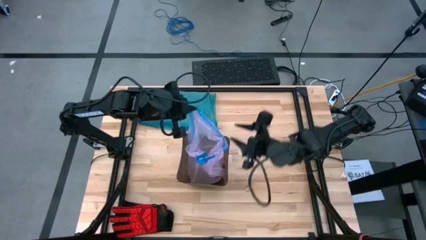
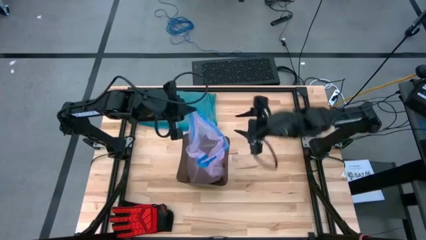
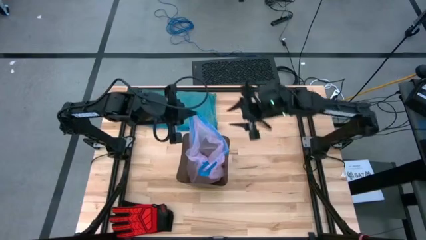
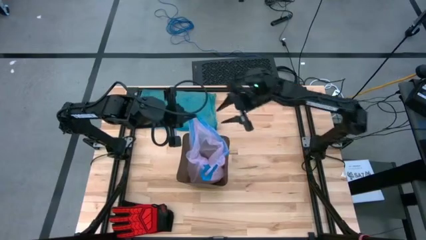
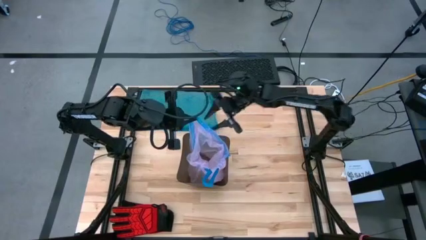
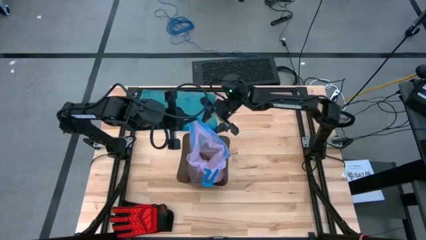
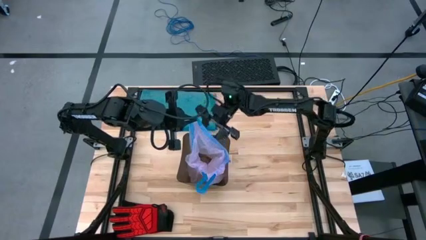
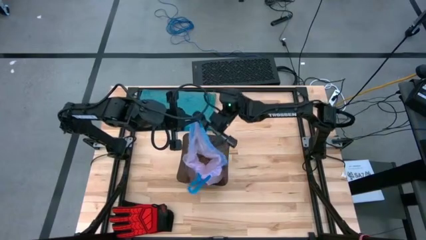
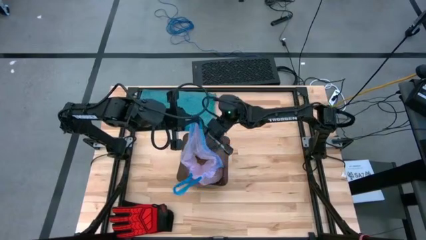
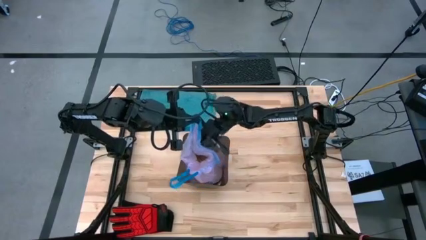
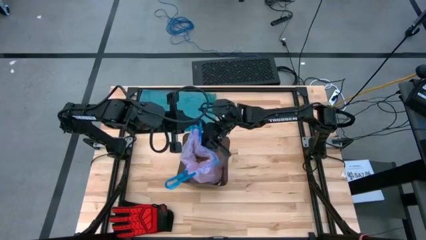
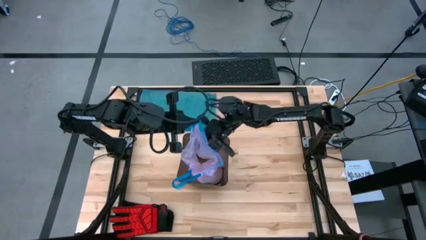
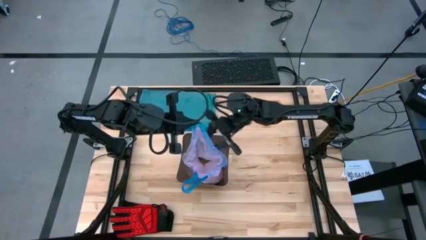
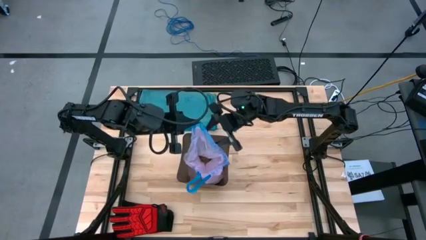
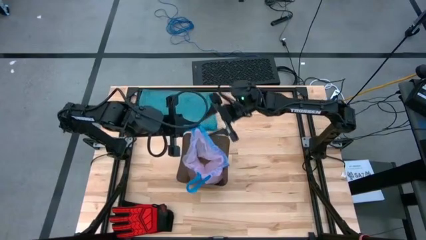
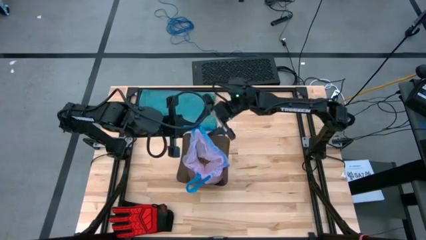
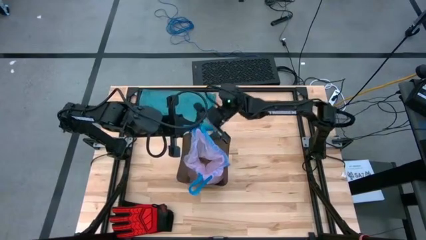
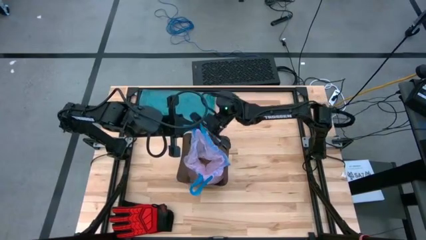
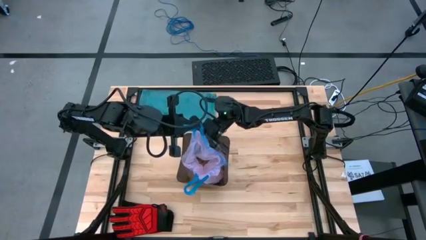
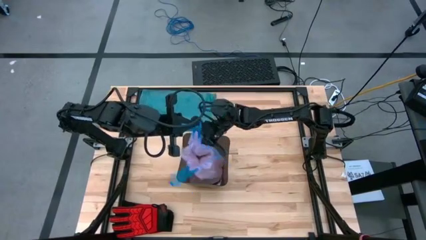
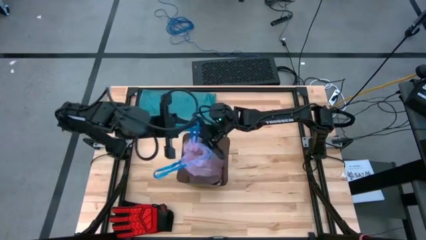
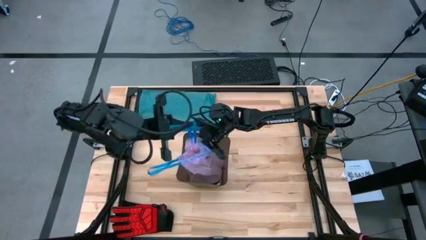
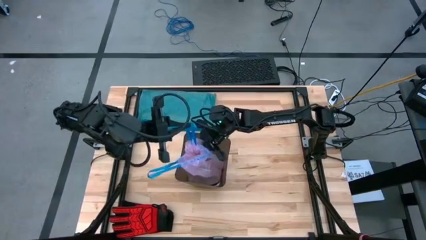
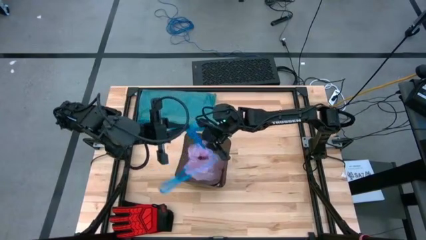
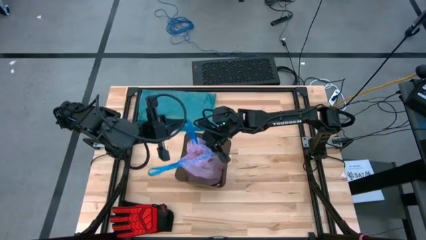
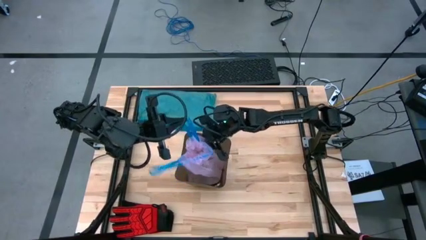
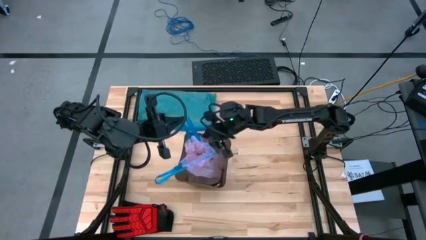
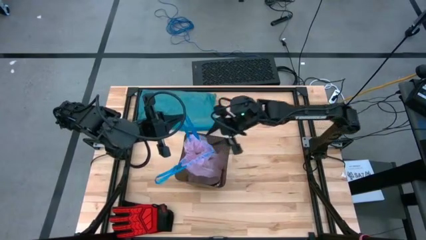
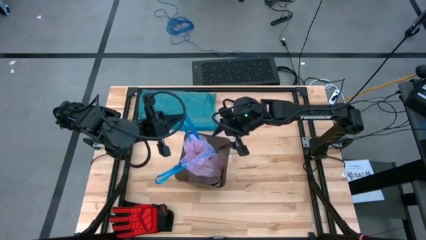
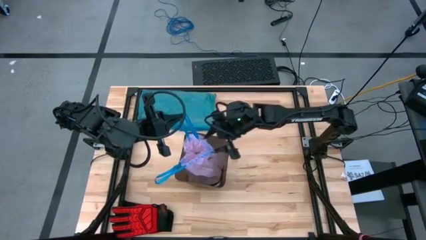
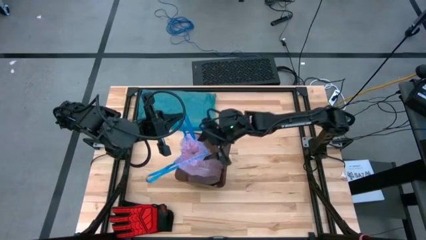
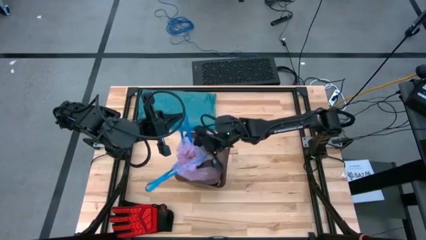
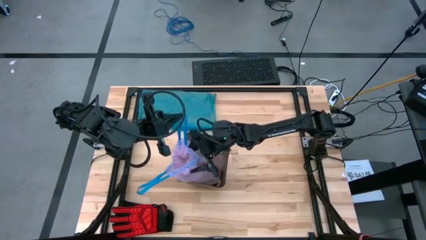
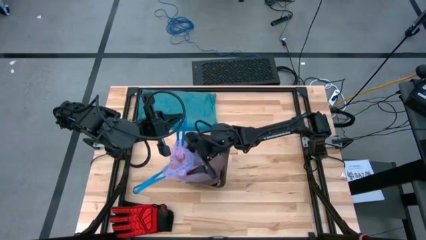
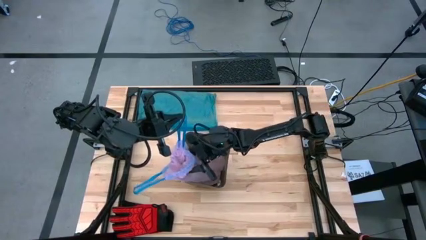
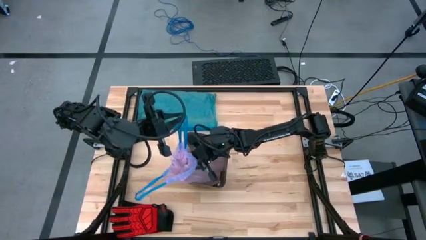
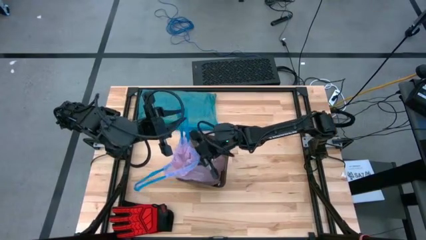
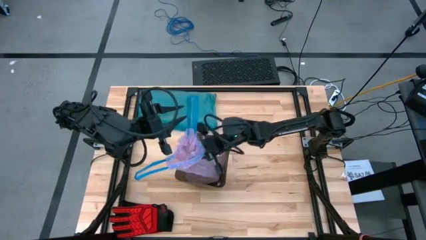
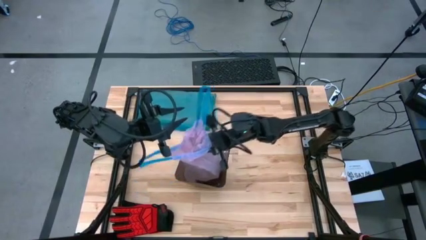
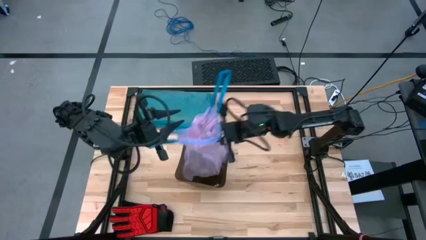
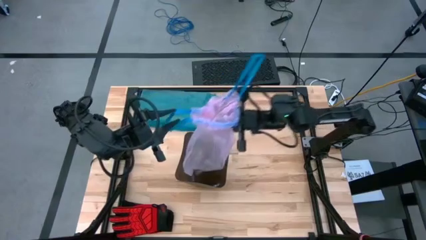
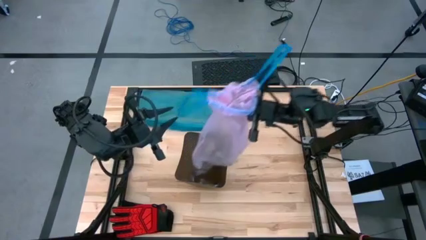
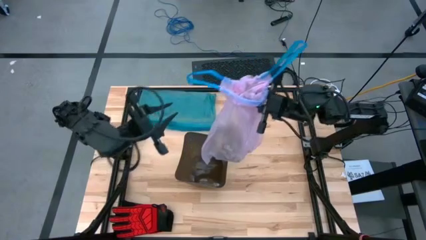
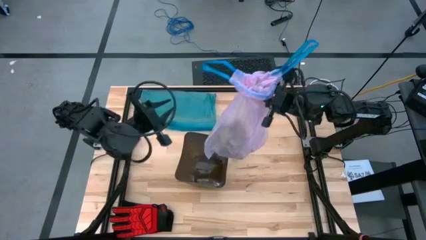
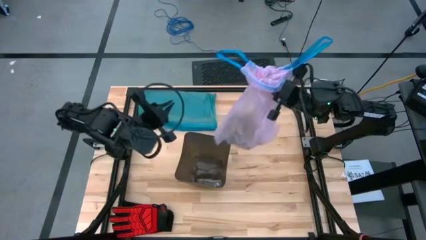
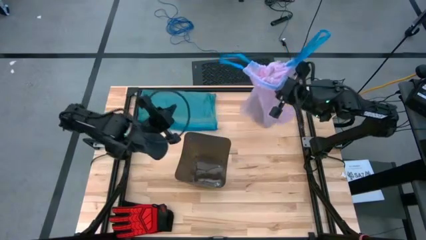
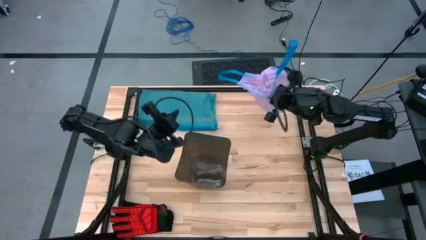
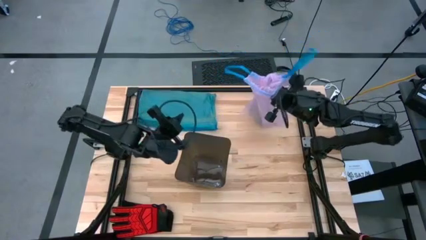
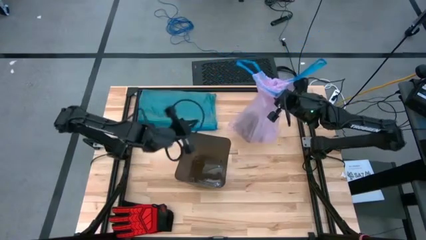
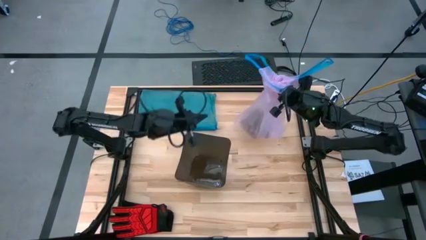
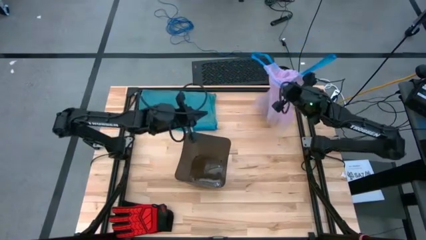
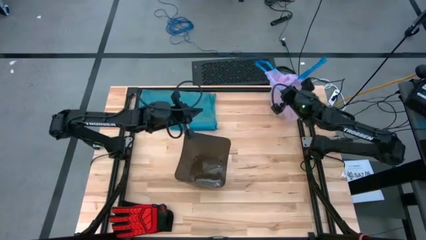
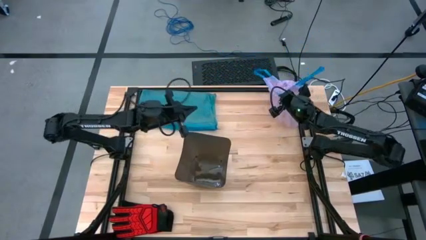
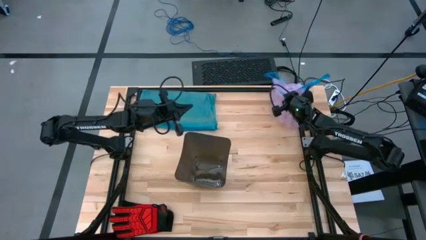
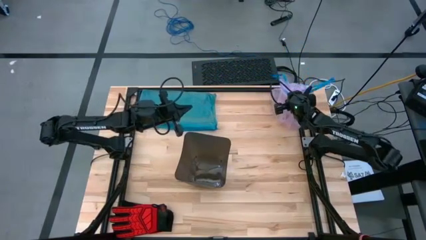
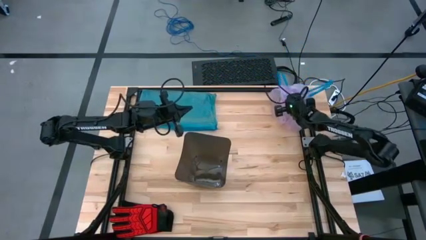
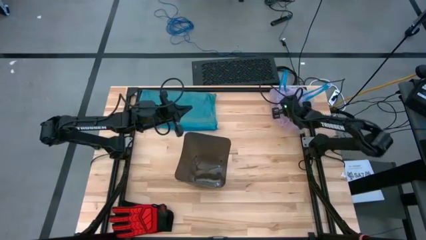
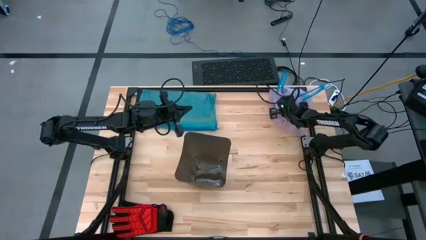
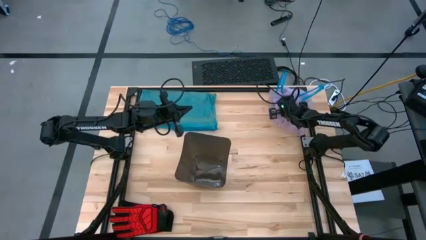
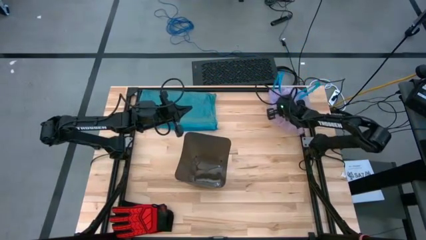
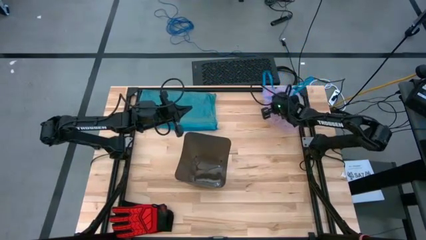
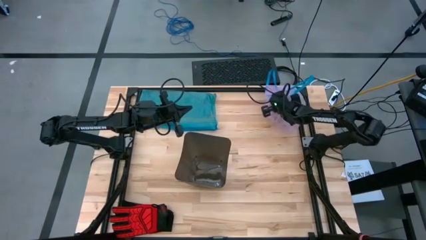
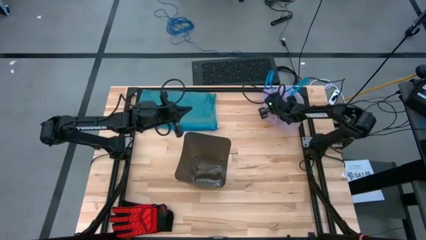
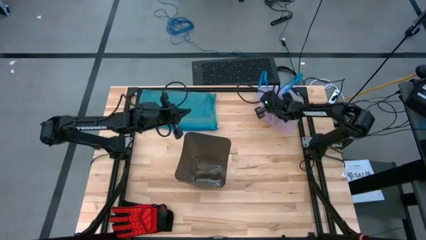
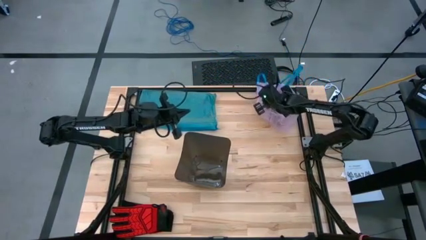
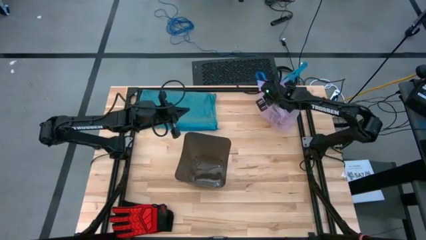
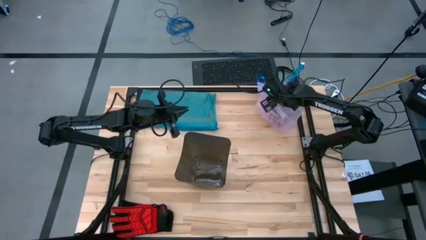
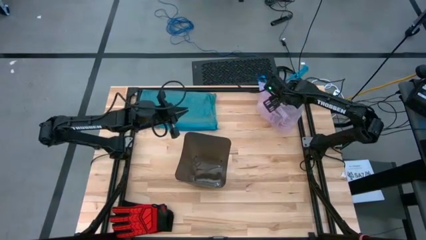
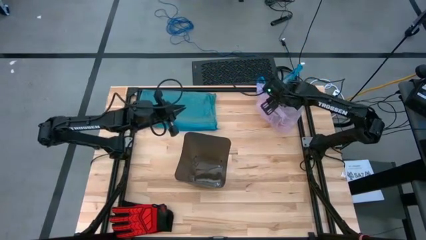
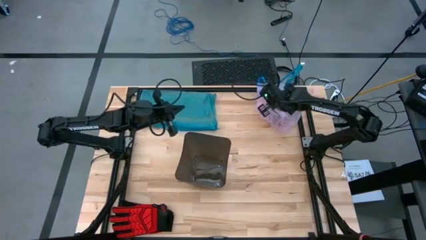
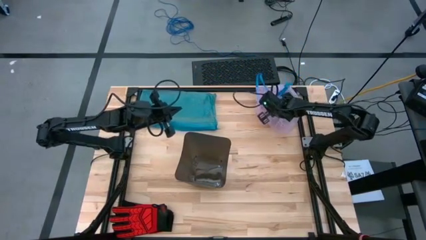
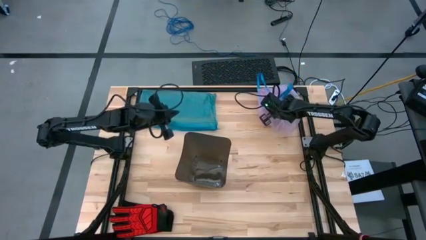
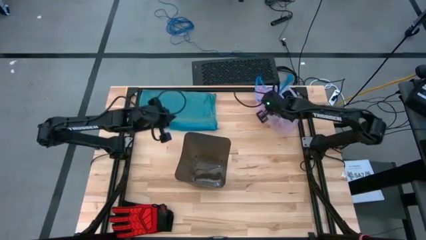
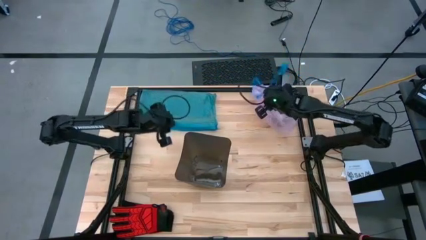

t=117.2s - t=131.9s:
Task: place trash/remove bag and relplace
Remove the trash bag from the trash bin and put it on the top right of the table
